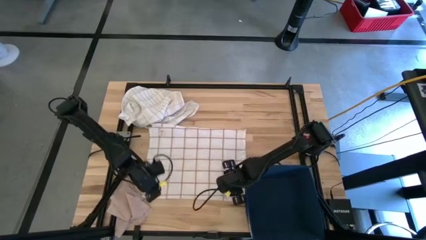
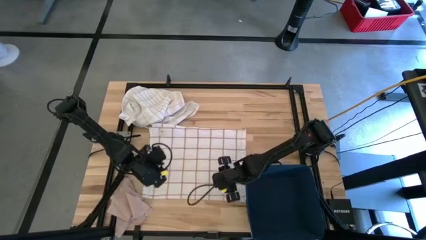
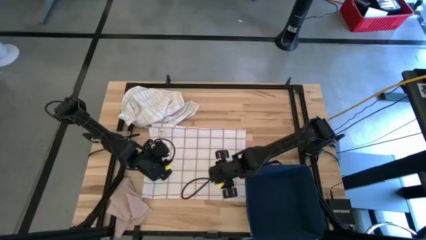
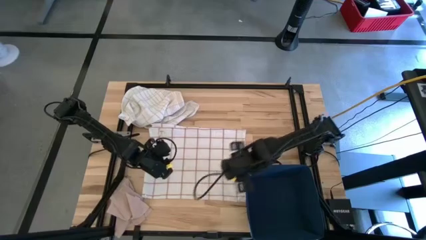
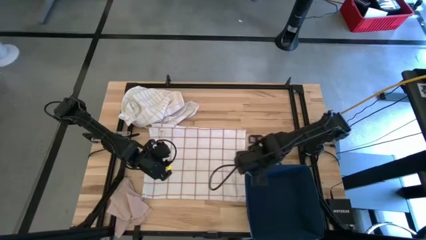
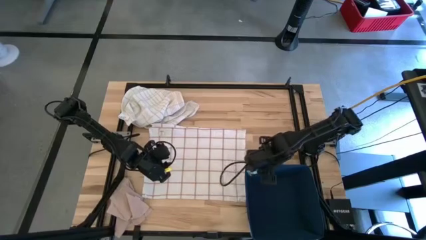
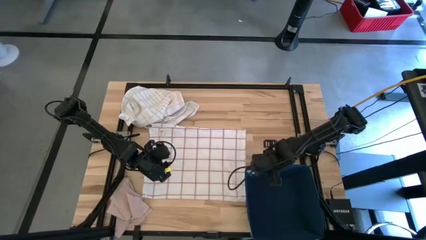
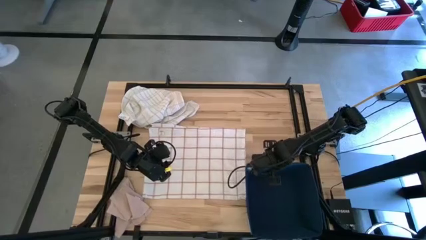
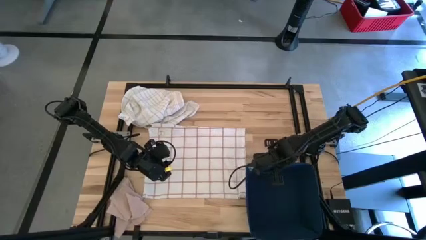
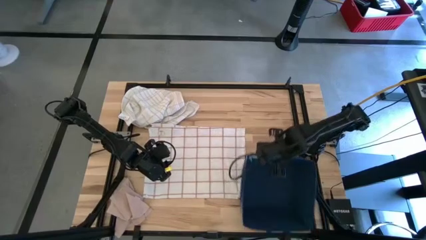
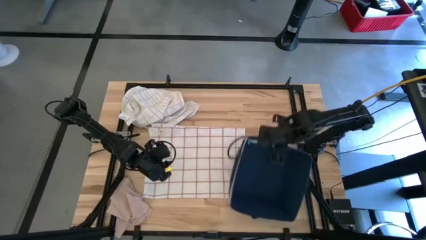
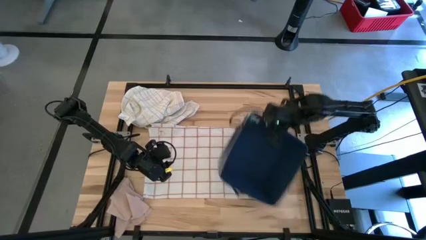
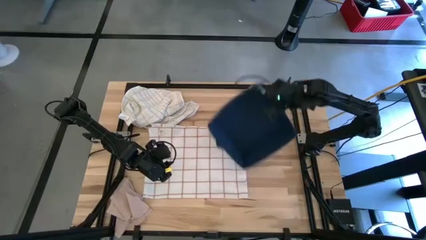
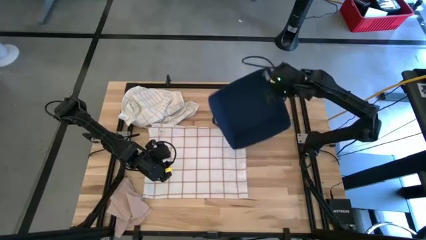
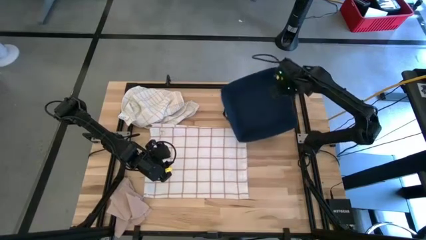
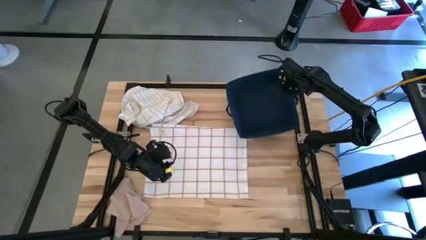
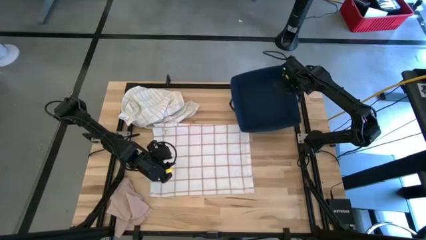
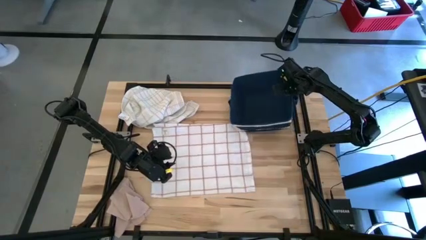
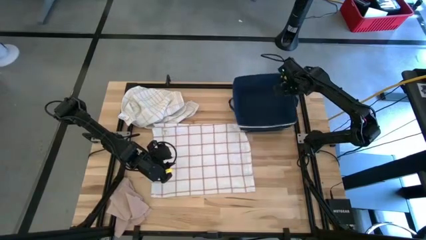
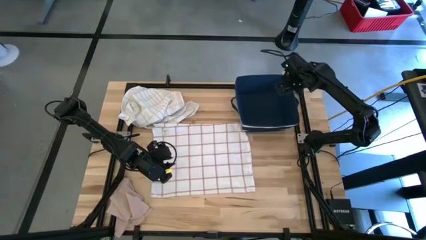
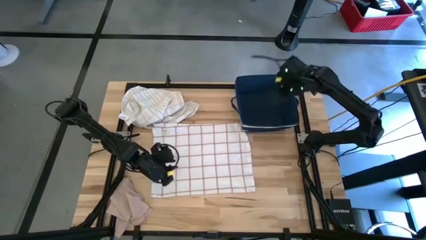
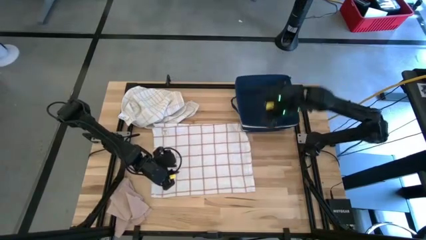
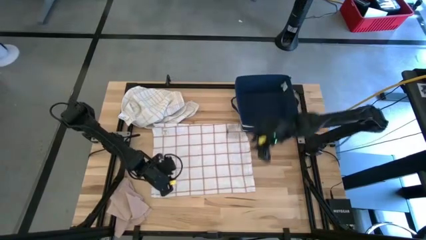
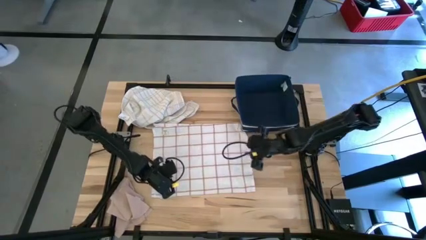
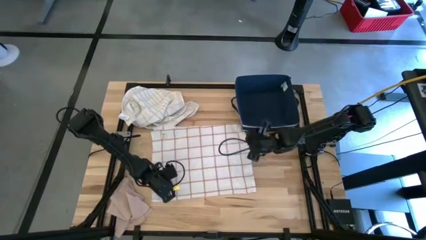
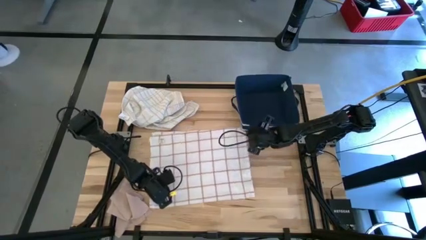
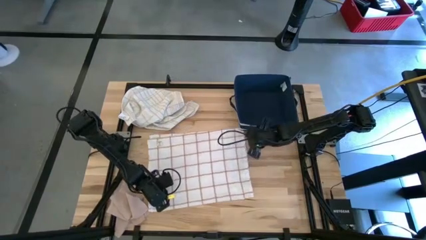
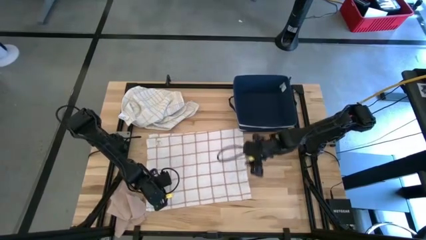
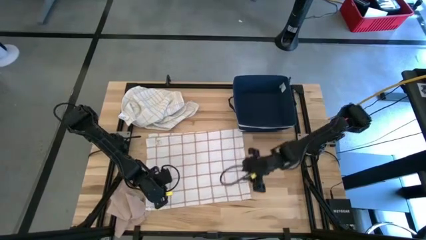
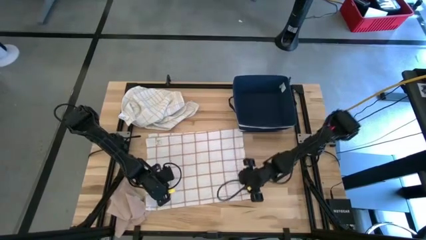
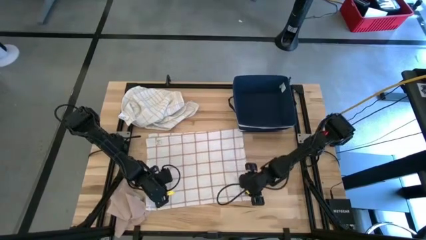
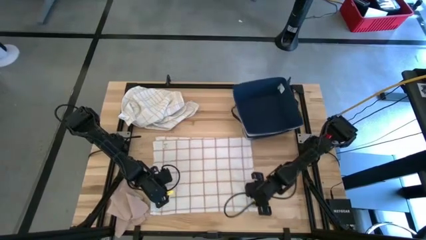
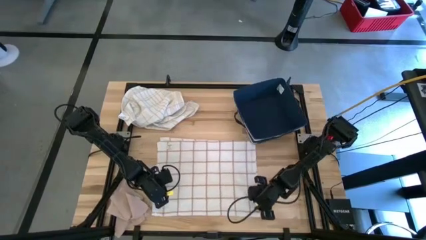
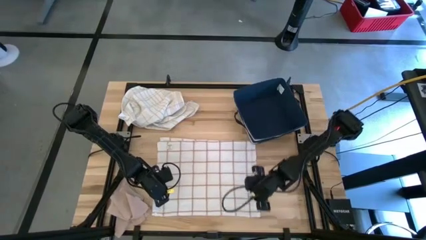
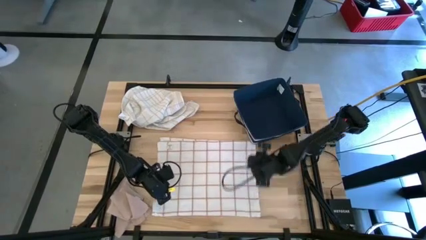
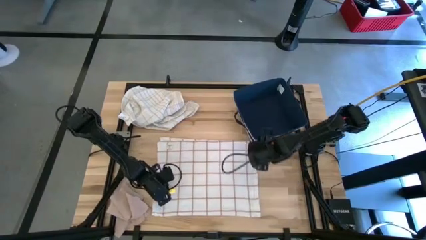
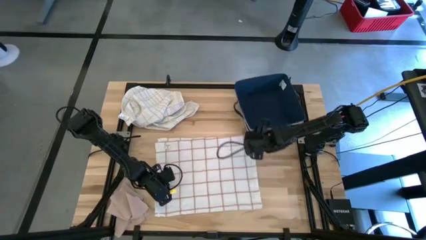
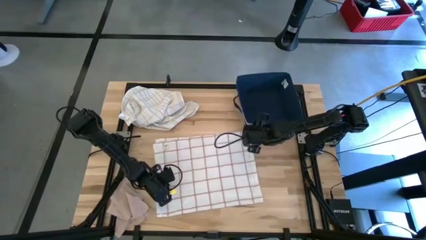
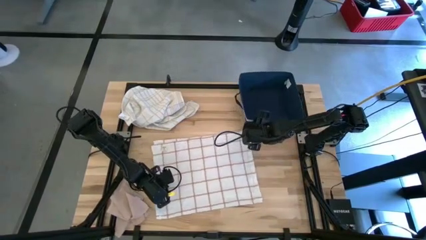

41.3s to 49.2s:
Task: Fold towel
Move the blue bin to the top right of the table

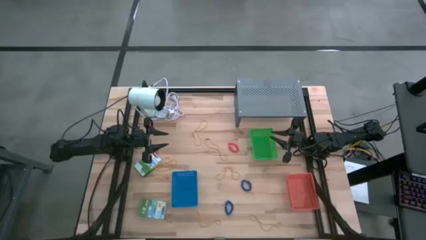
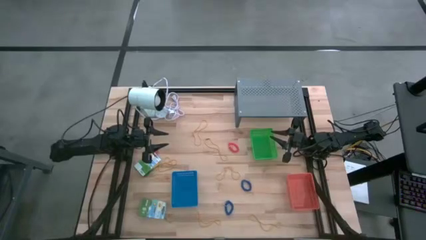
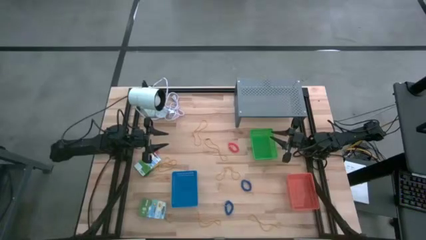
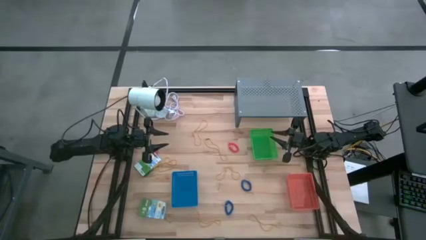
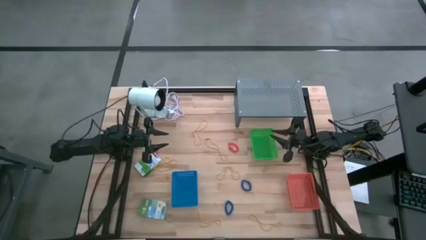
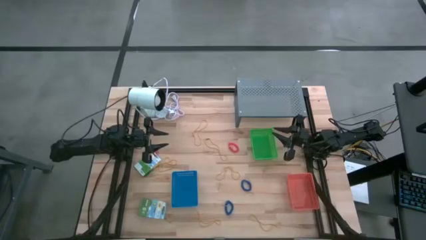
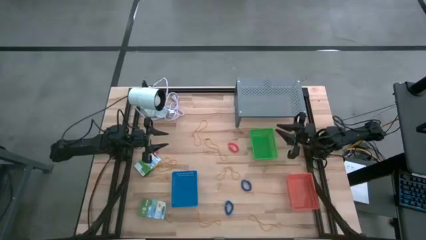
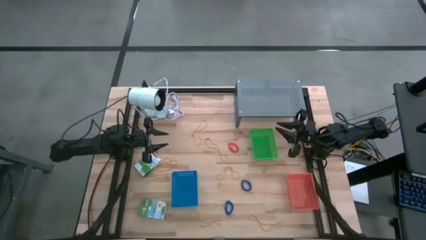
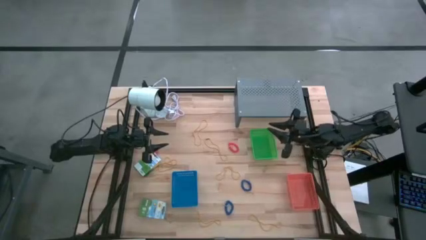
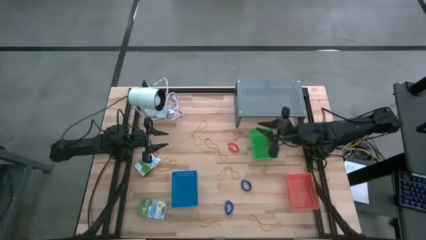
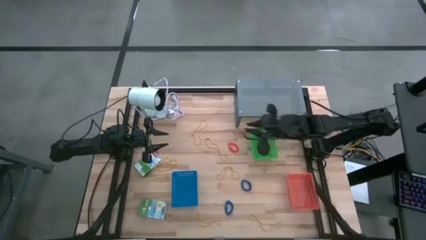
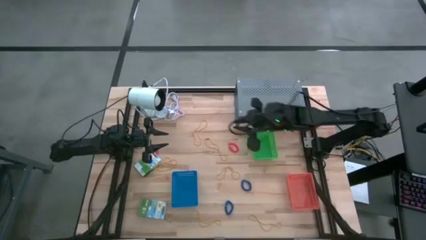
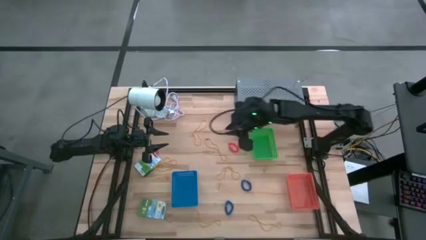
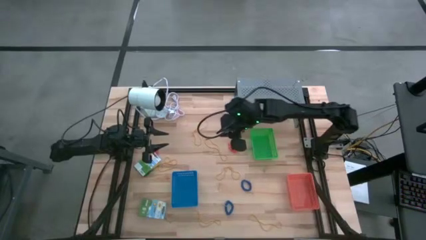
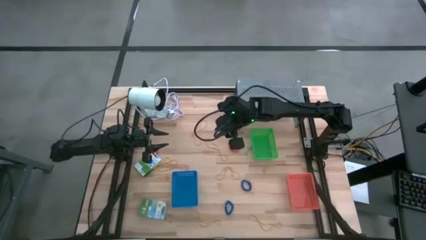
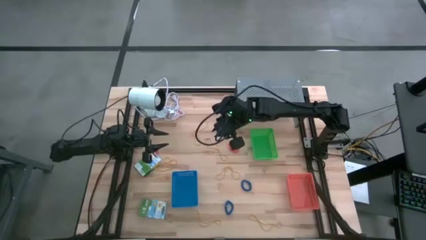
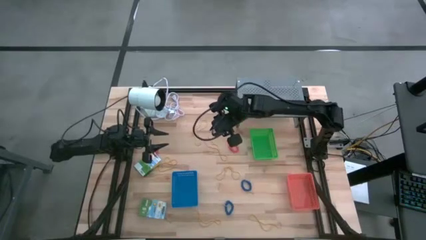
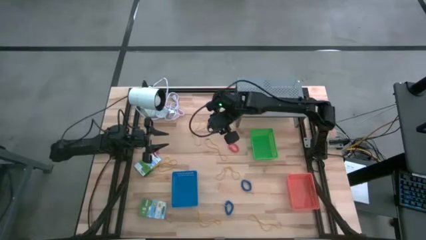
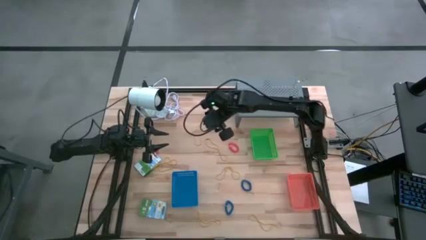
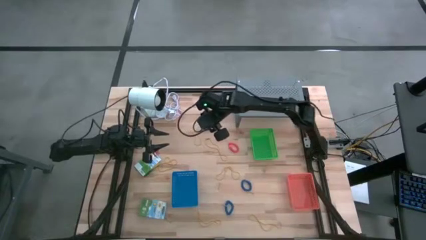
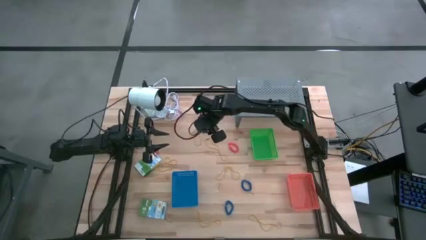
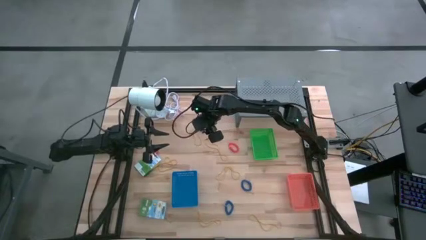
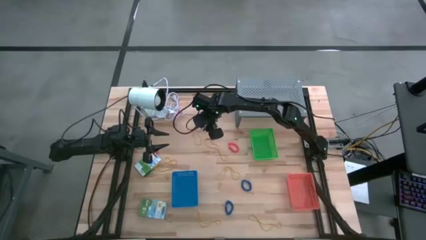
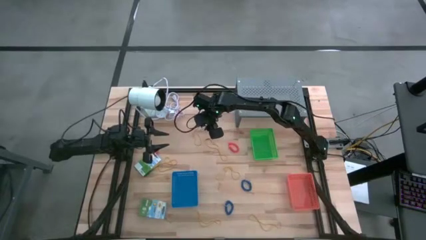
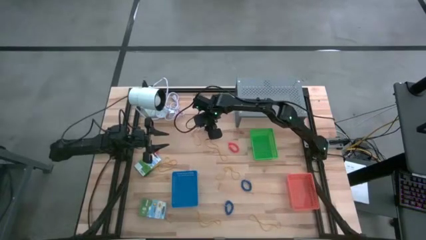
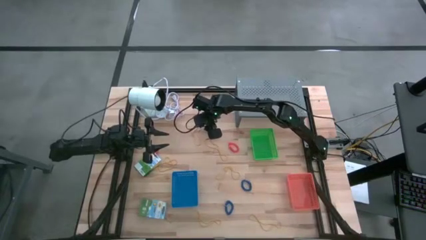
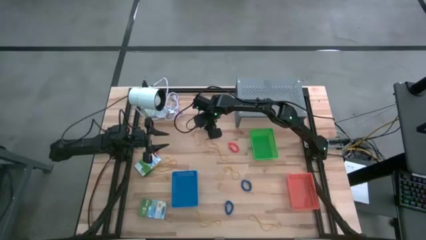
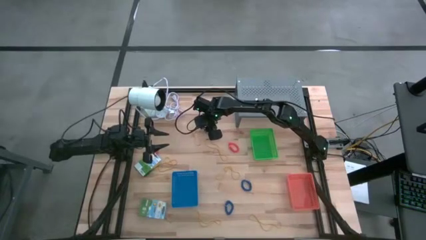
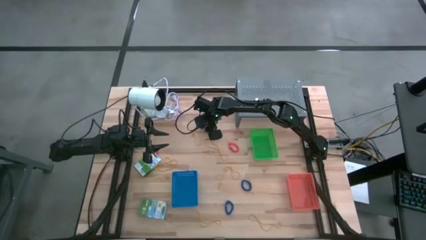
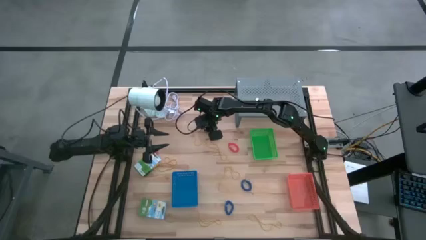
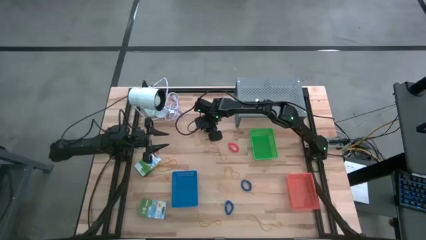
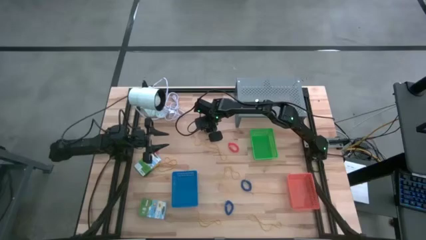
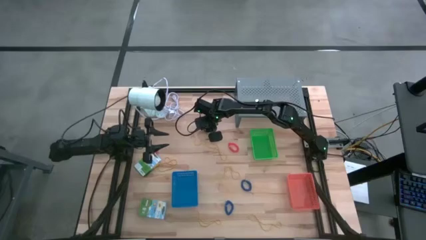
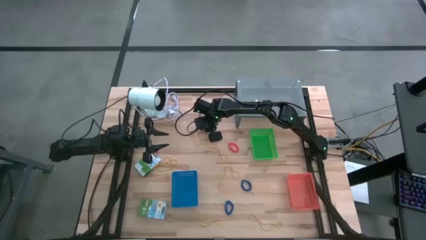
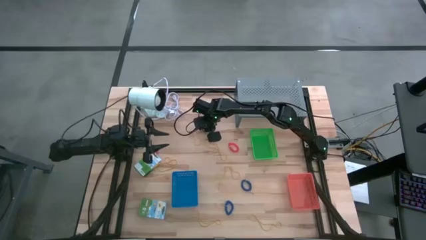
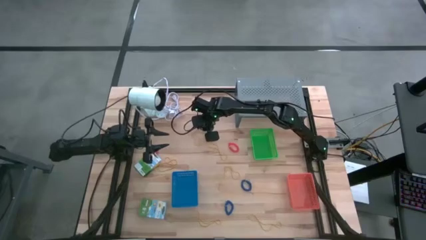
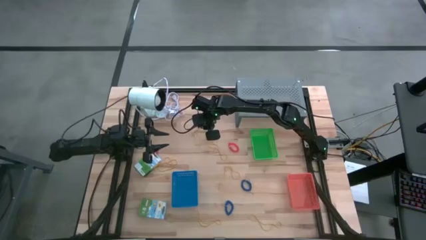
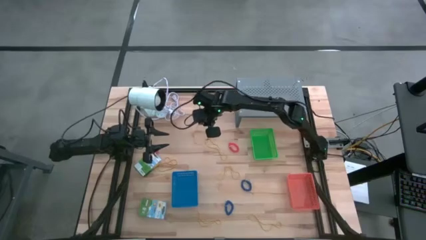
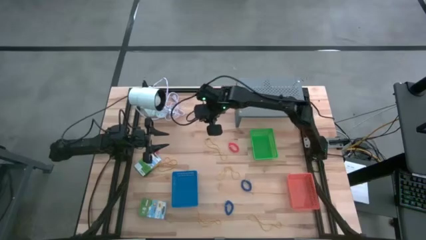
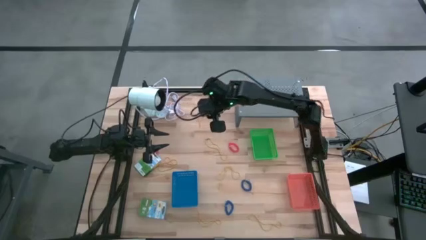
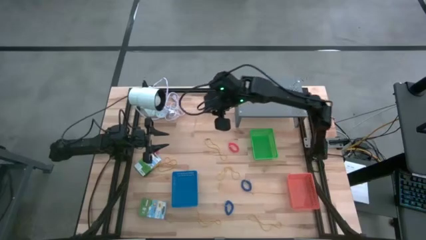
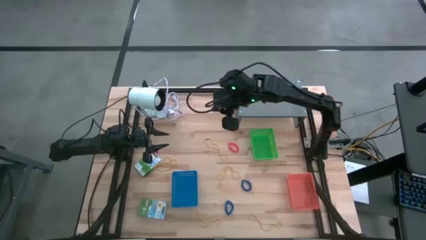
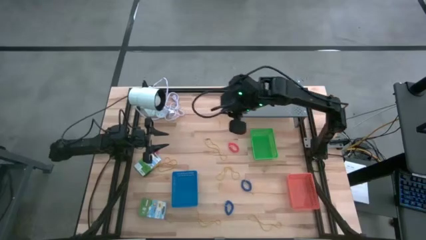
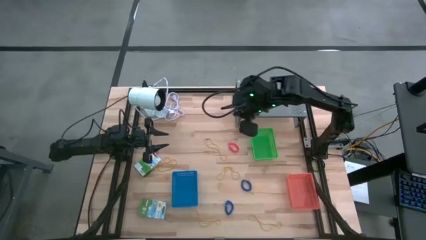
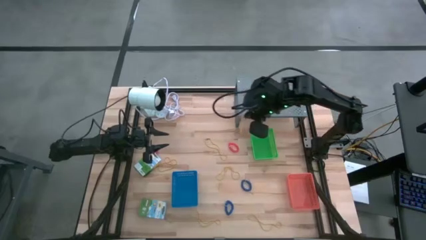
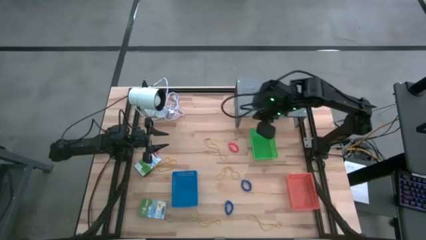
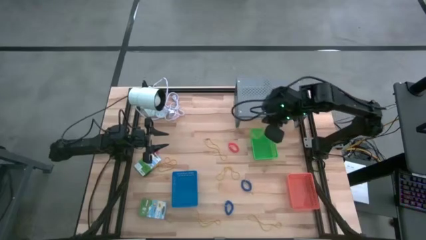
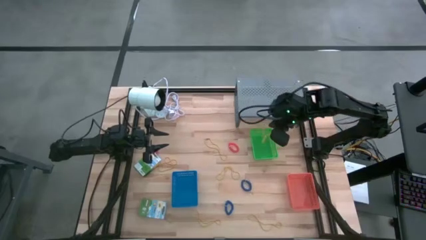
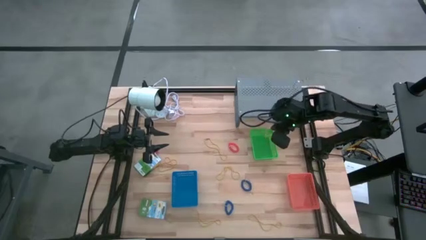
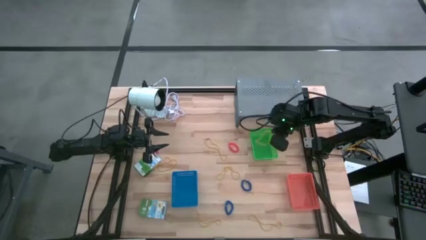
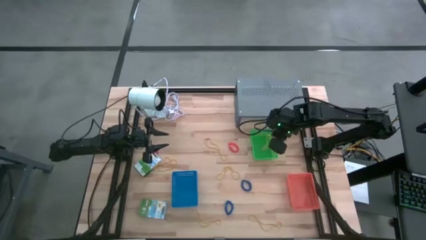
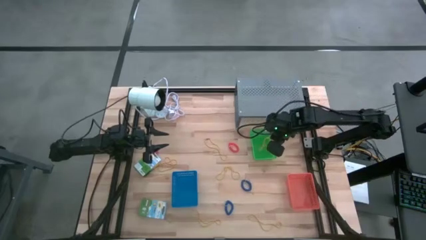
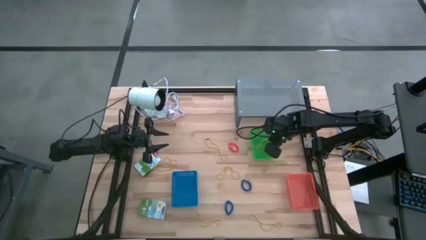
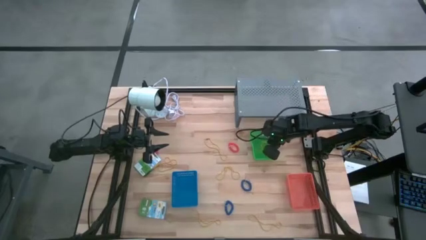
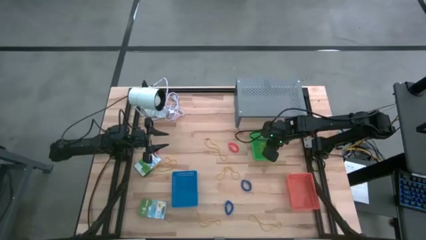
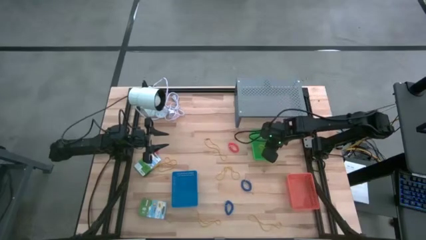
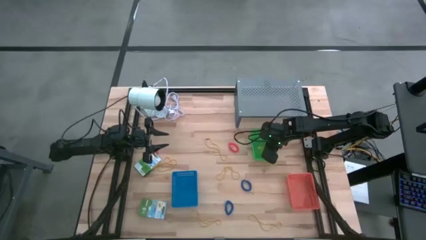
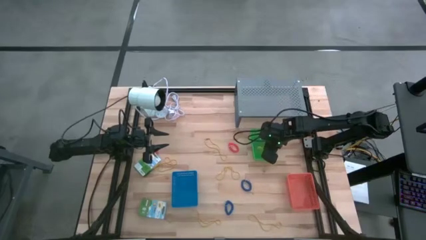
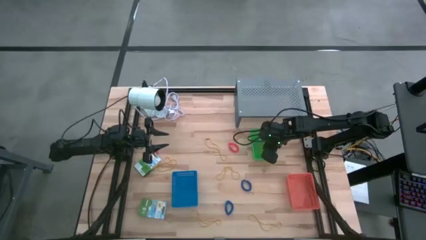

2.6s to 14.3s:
Task: Pick & Place Office Desk Supplies
Put the yellow rubber band into the green bin
